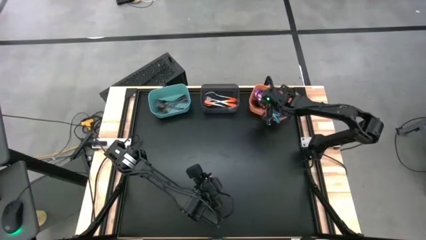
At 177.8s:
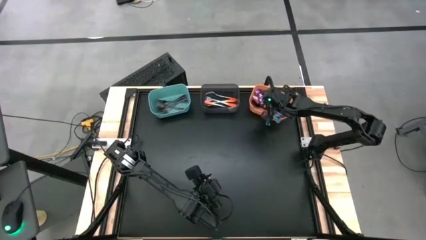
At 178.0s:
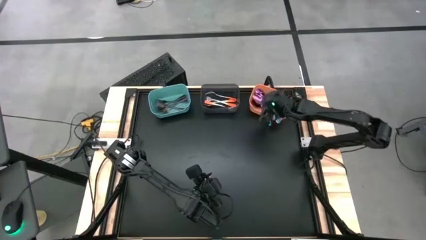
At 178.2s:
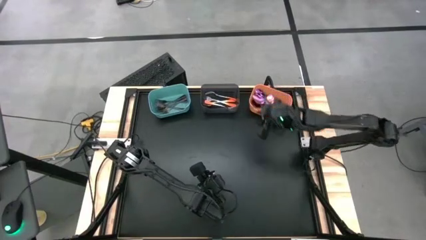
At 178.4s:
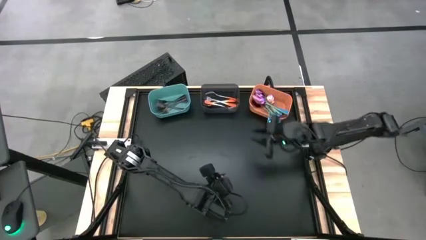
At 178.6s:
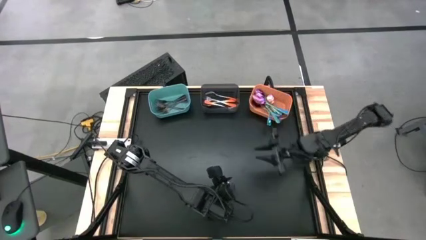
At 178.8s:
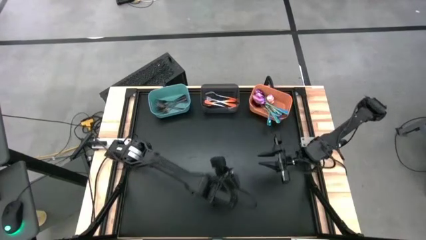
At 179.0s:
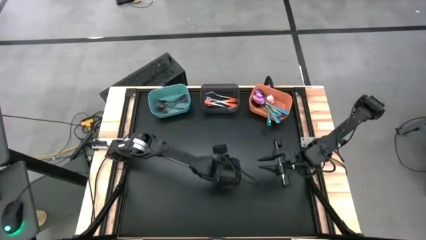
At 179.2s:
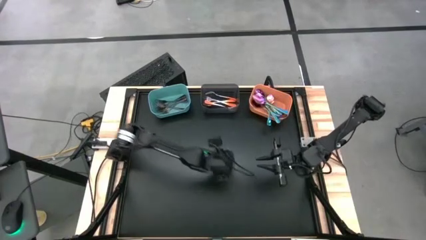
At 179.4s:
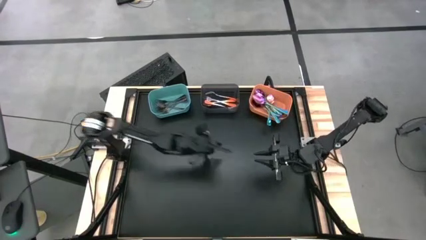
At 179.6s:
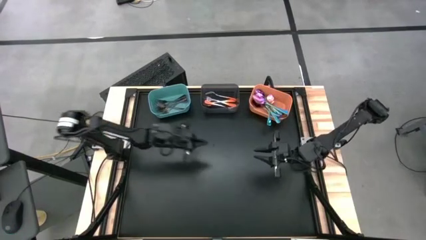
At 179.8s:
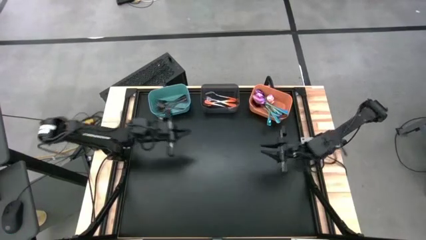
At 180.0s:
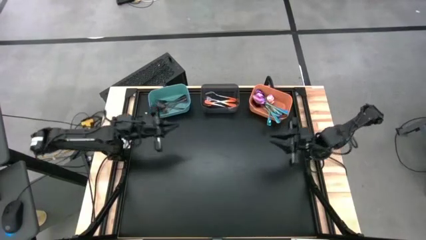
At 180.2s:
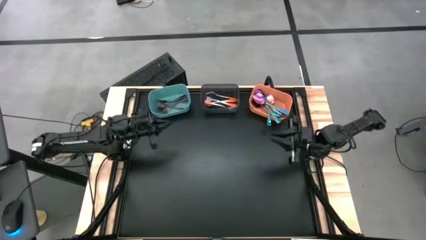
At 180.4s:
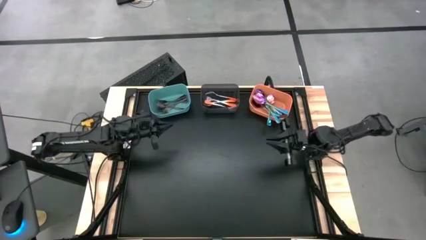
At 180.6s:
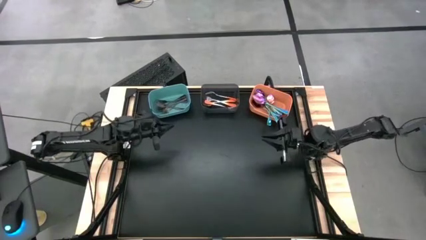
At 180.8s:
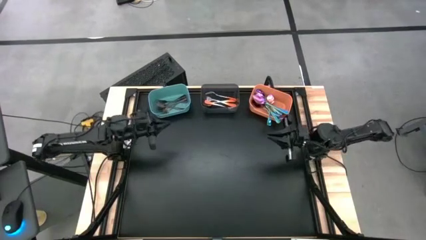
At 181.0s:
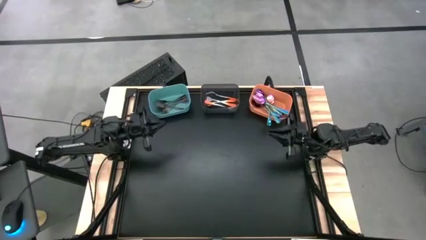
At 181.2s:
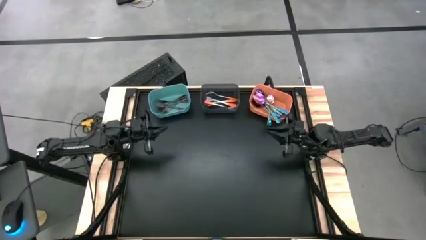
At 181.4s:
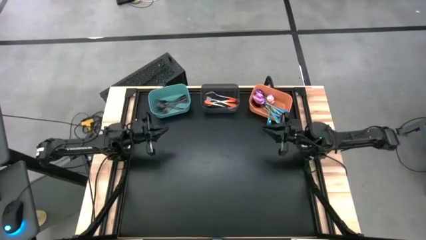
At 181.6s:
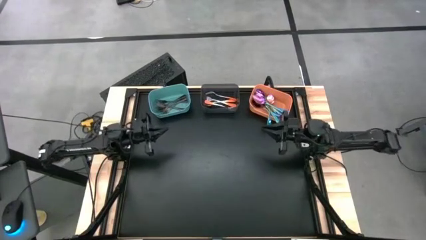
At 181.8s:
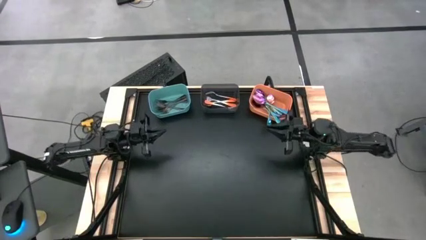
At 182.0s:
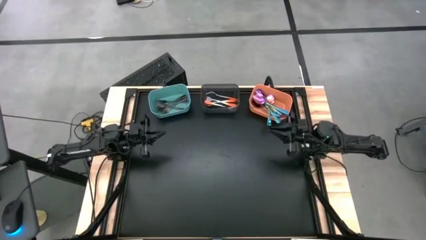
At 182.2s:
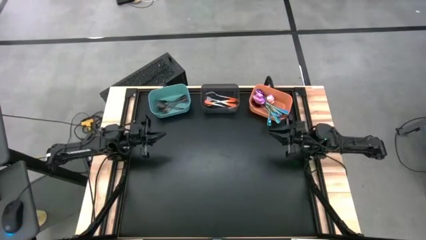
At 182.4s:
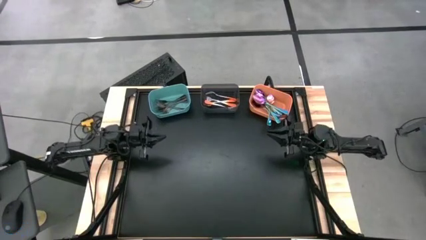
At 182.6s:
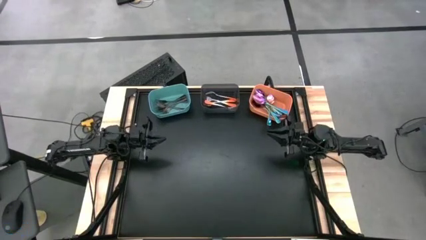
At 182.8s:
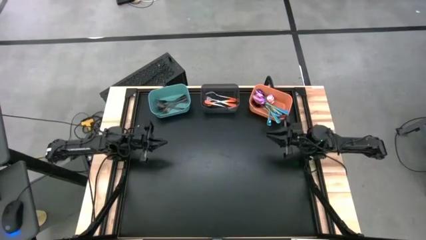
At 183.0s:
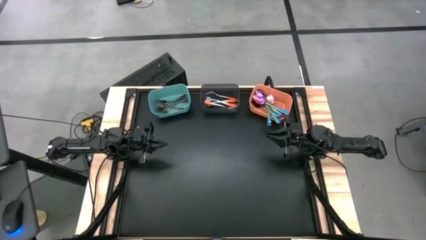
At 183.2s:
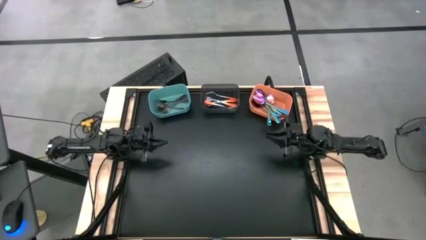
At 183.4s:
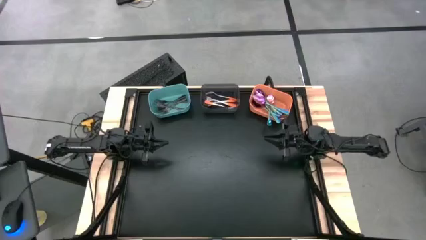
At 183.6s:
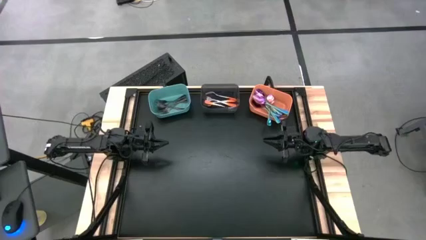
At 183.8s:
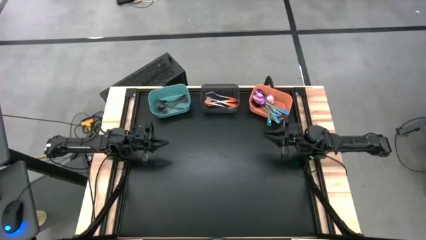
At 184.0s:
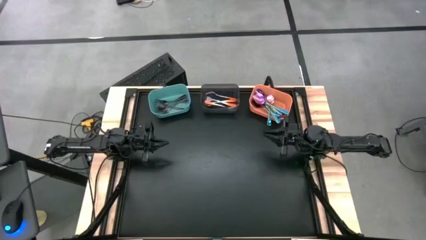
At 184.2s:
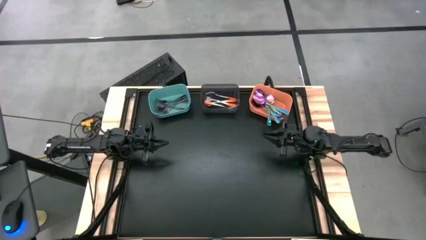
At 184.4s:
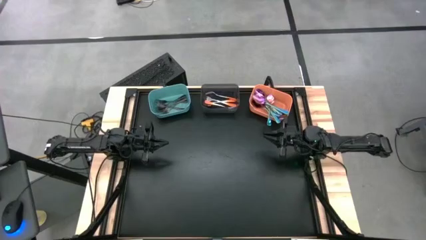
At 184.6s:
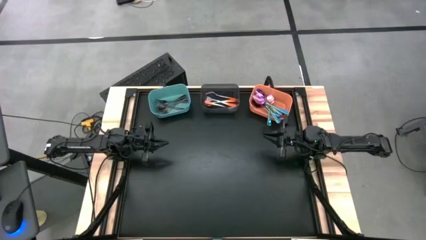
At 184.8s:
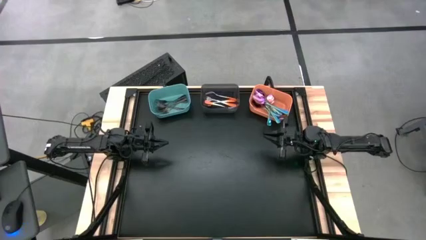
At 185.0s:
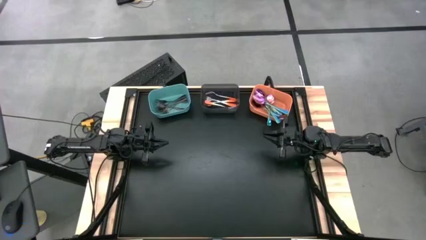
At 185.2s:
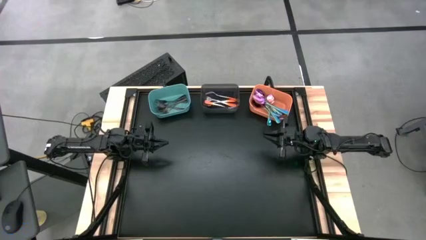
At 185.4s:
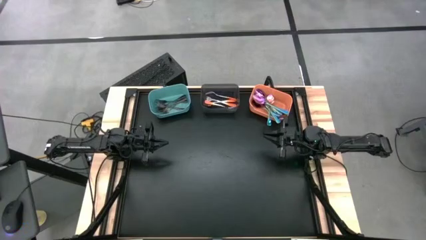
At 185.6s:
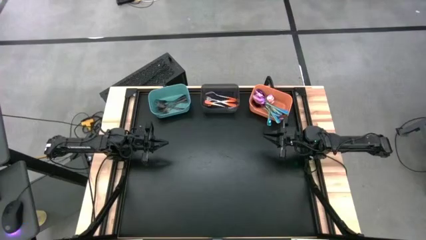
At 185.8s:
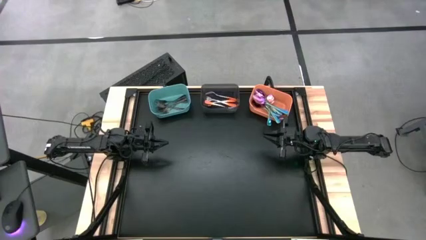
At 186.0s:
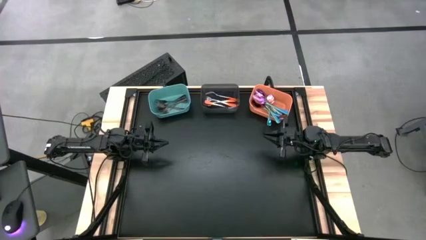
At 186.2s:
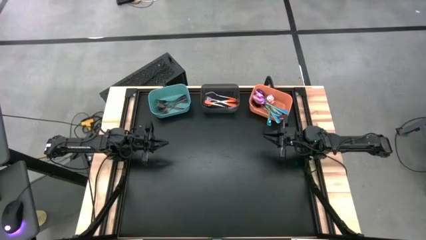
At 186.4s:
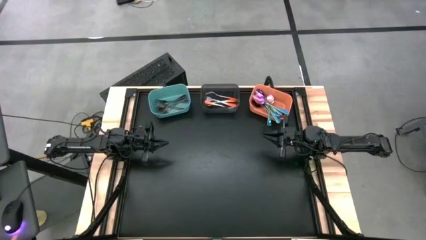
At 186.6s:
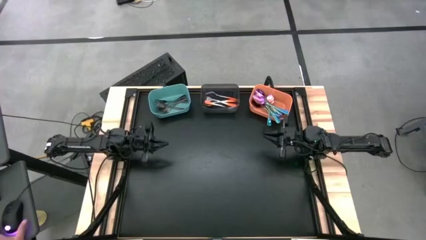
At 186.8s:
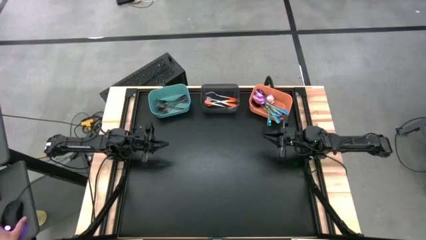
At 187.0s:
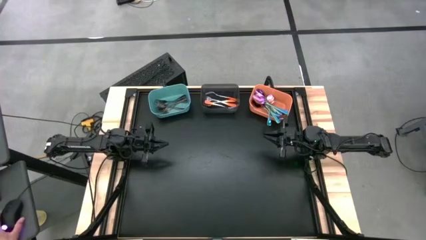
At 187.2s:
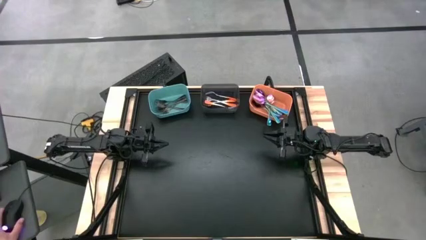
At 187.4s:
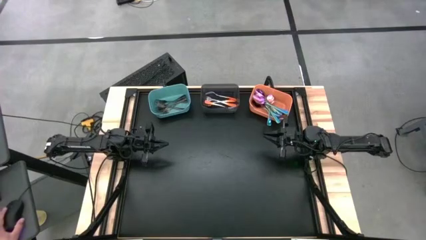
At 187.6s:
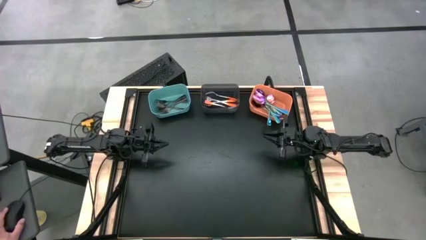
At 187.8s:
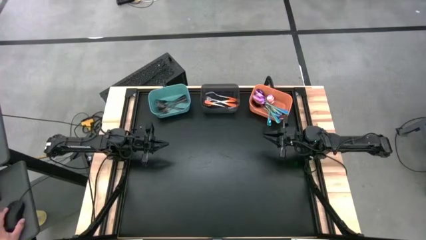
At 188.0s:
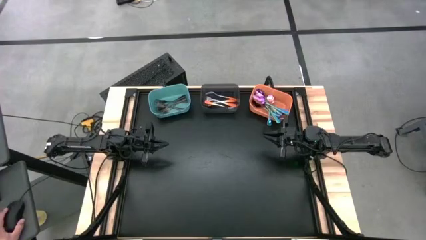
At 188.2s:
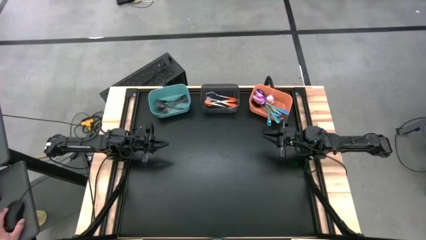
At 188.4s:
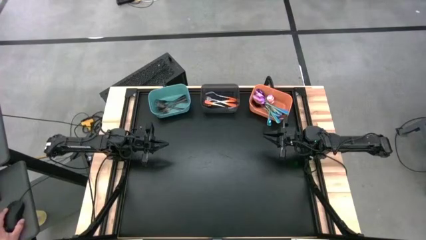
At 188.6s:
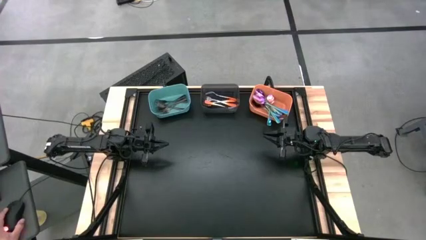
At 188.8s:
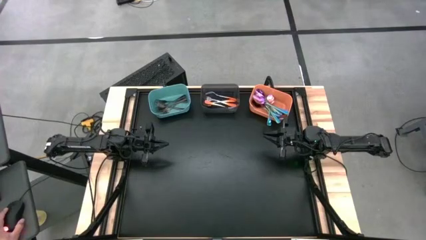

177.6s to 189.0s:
Task: Sort silverware by color (type)
Return to Home Position

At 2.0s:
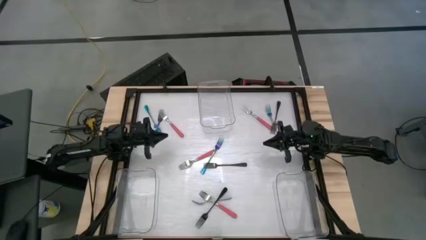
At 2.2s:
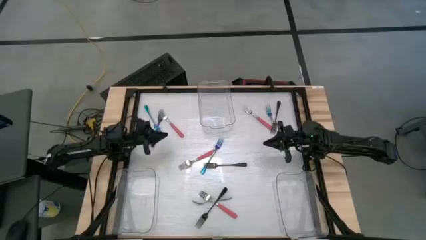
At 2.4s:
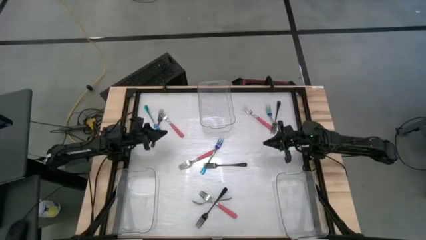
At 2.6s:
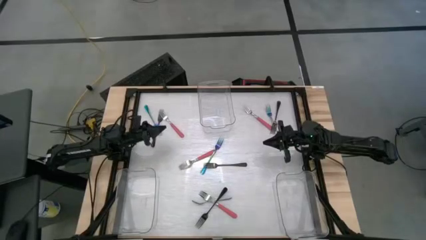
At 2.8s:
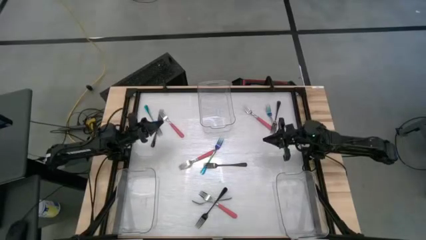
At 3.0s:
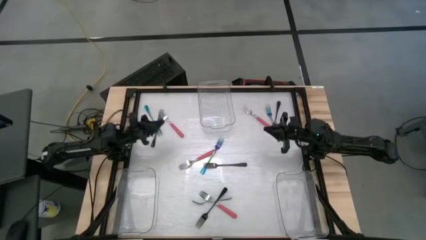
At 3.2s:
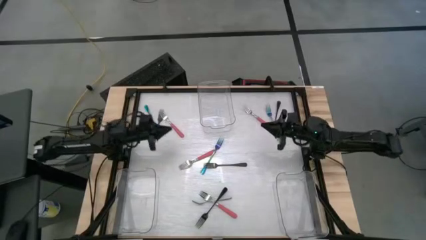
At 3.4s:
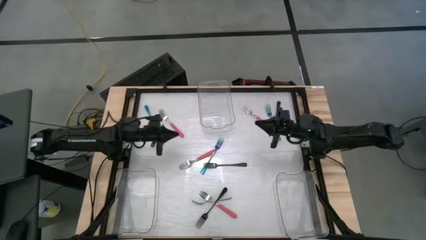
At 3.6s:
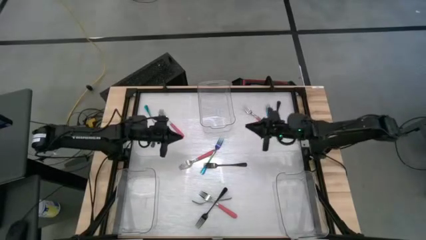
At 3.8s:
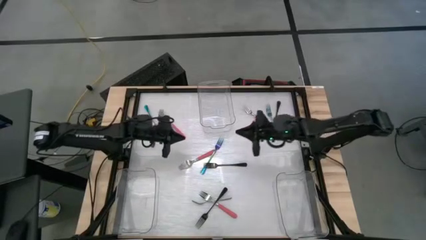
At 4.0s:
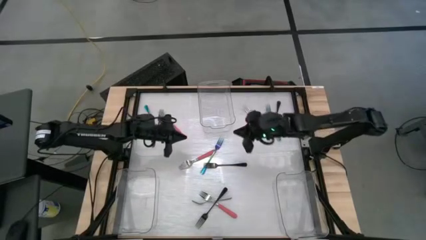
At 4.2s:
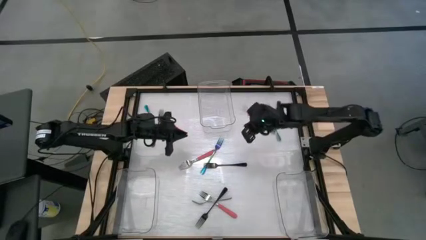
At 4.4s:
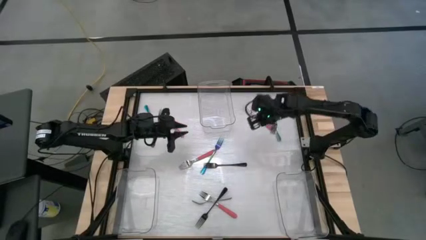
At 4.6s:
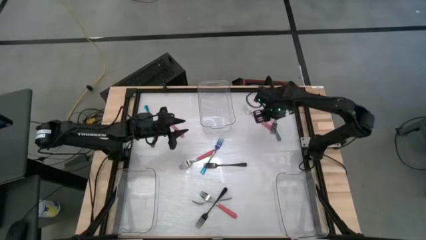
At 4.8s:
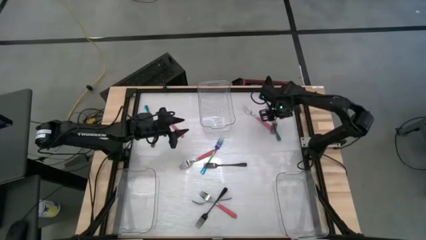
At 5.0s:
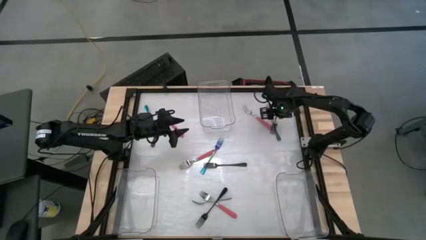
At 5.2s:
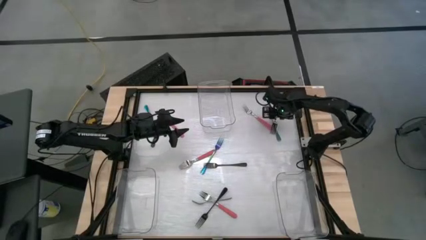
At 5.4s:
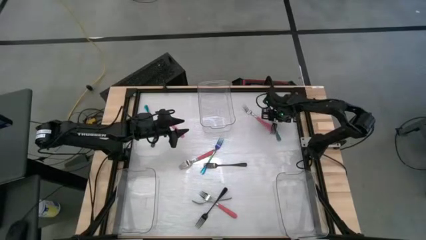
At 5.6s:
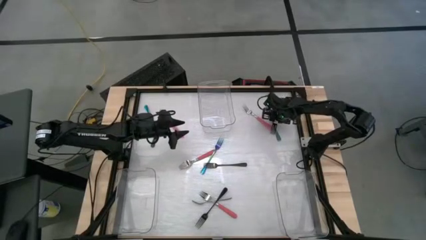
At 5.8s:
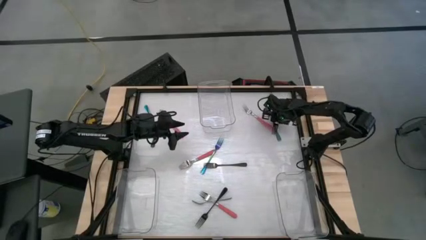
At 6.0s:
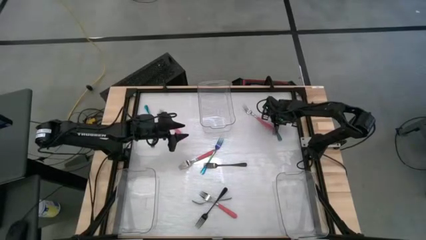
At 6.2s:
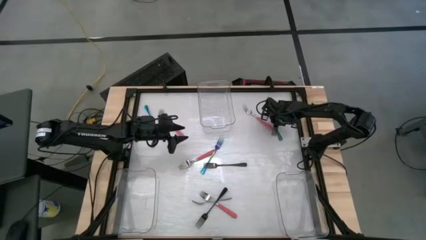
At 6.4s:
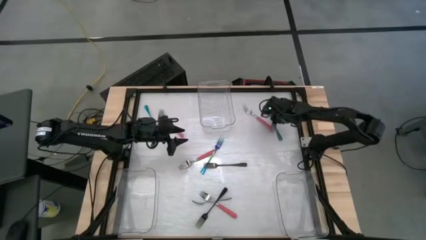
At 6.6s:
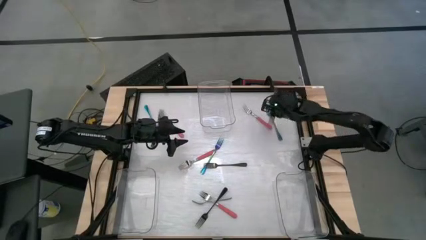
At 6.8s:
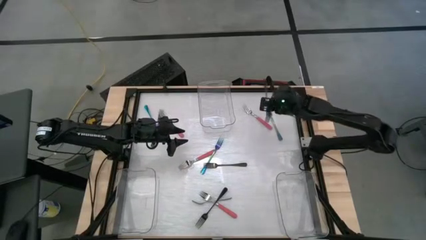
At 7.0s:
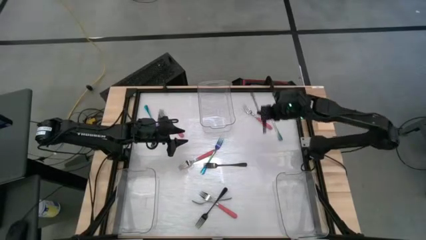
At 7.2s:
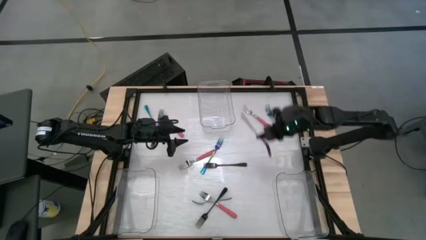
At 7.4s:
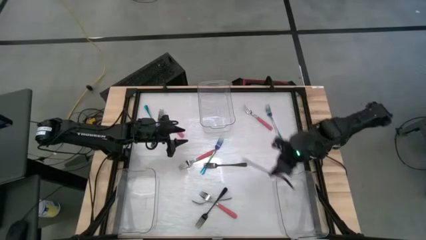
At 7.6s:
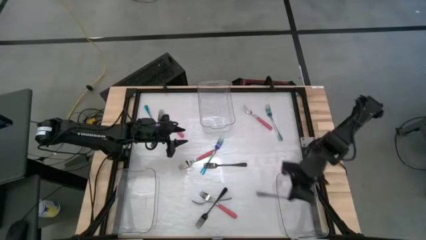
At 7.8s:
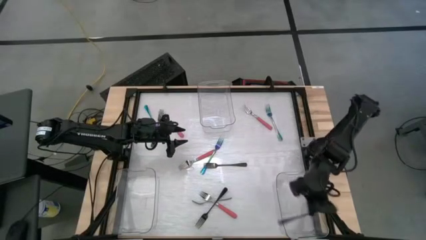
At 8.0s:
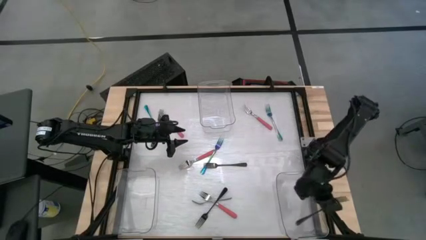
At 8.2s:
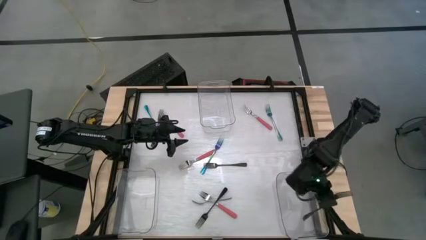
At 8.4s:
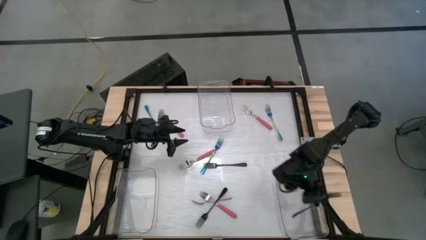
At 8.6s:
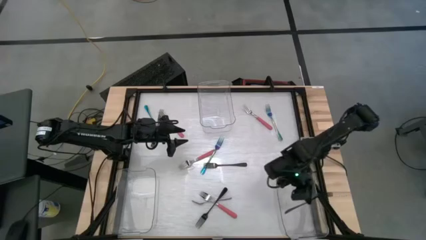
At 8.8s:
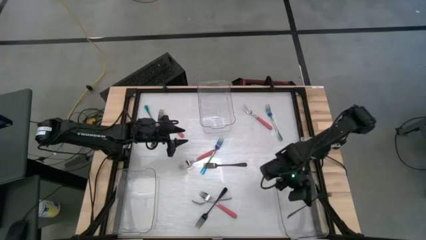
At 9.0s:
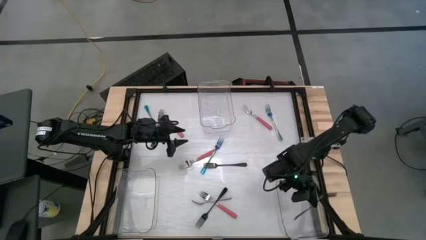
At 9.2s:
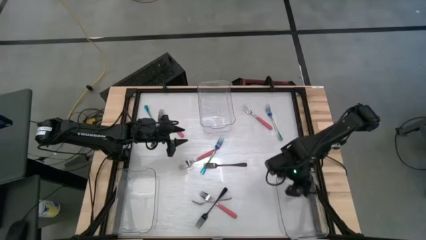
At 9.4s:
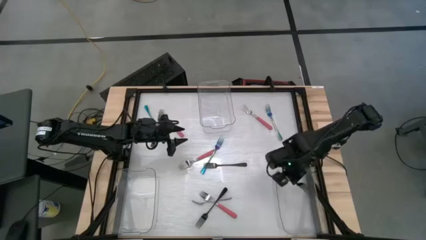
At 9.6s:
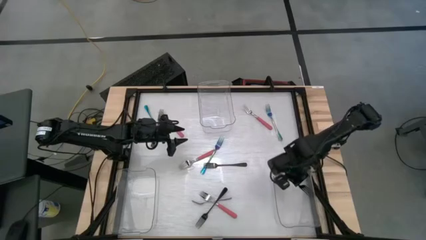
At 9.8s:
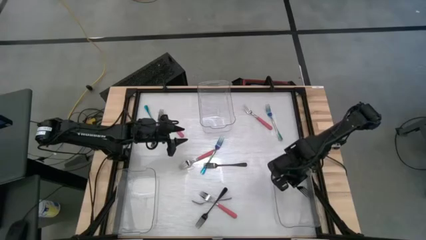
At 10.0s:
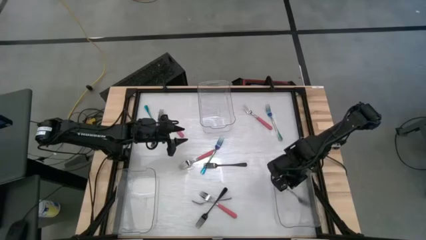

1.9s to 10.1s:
Task: Sort silverware by color (type)
Put the black fork into the bottom right transparent bin
